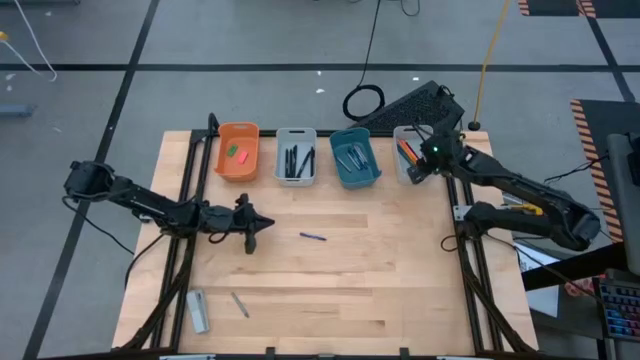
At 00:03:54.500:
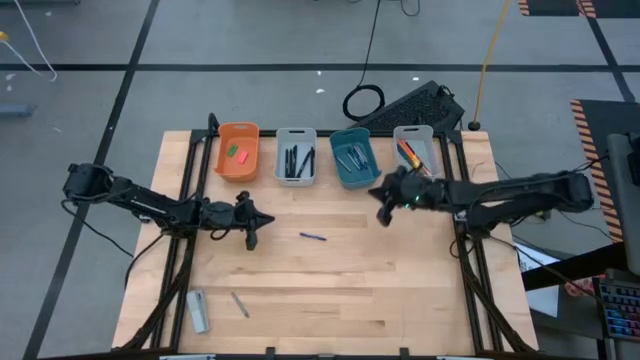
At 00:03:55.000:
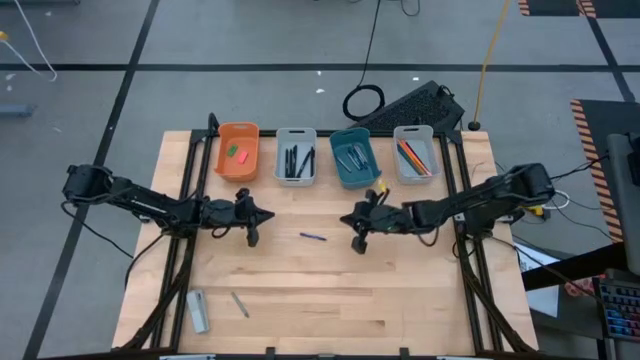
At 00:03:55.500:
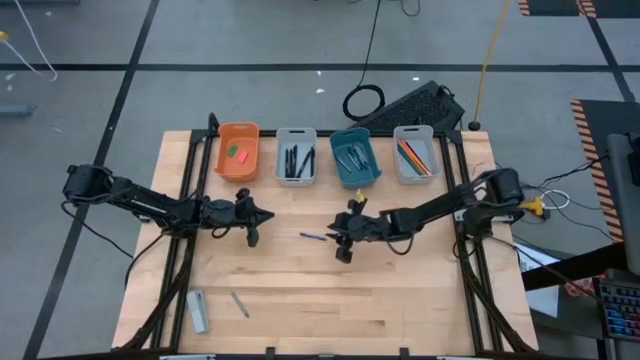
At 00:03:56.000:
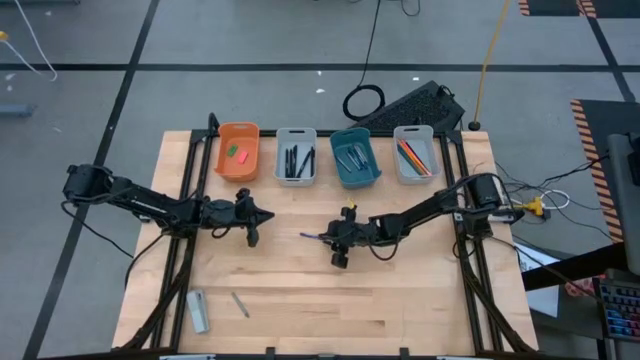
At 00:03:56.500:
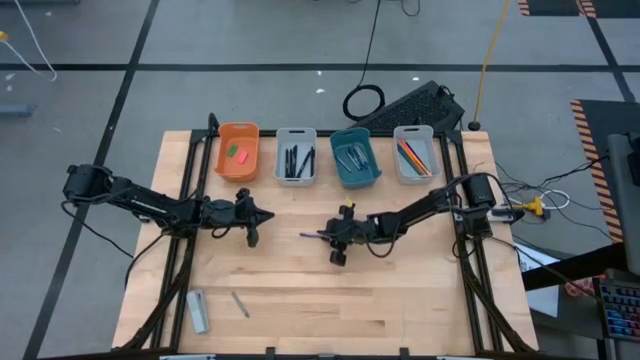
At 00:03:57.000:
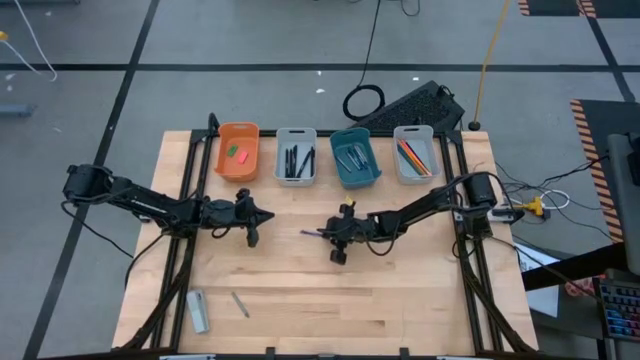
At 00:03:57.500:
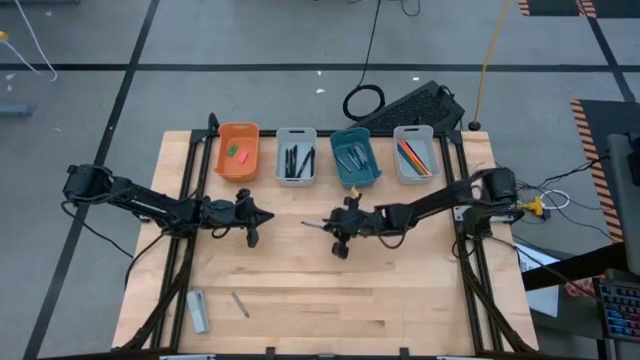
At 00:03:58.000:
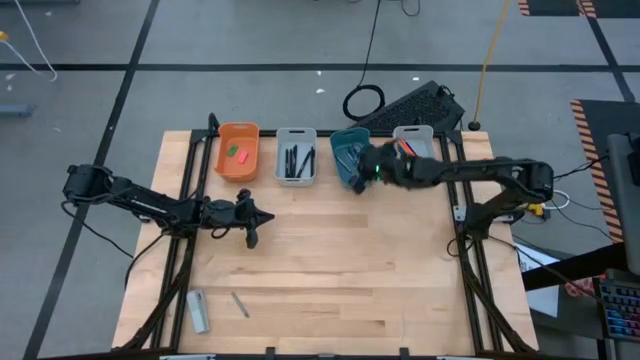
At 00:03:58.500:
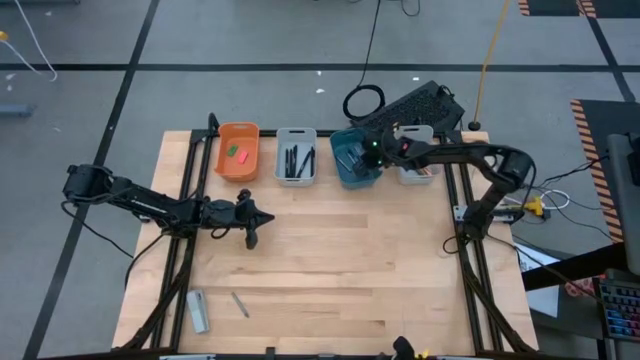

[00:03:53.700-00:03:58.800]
Task: Sort crayons/erasers/pens/pencils in bins
Put the blue crayon into the blue bin

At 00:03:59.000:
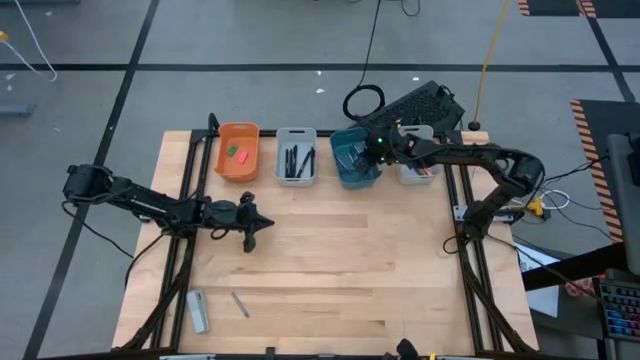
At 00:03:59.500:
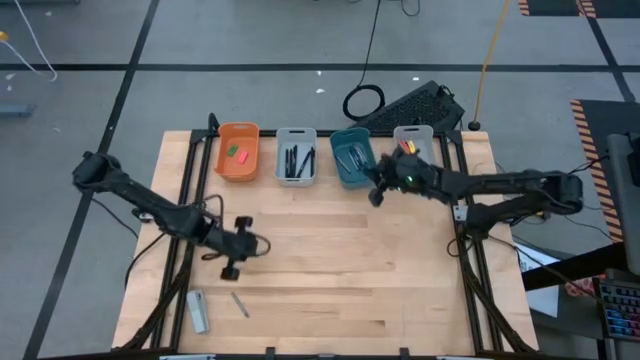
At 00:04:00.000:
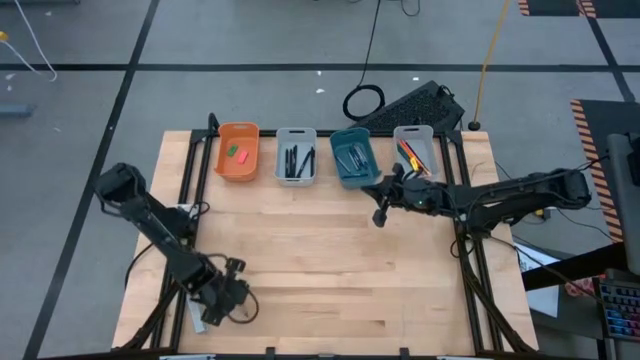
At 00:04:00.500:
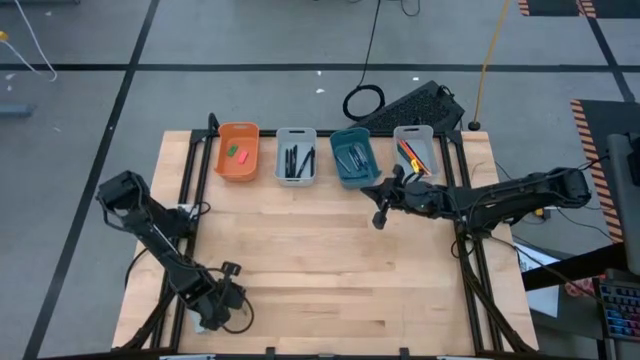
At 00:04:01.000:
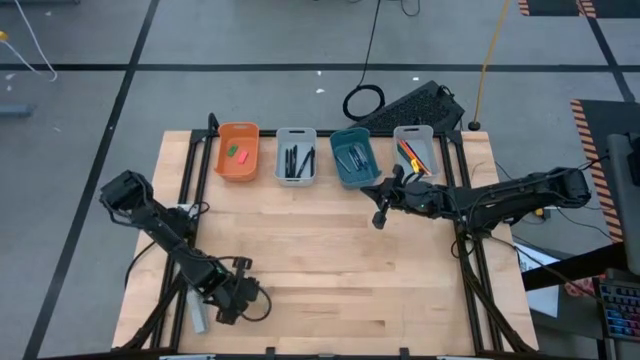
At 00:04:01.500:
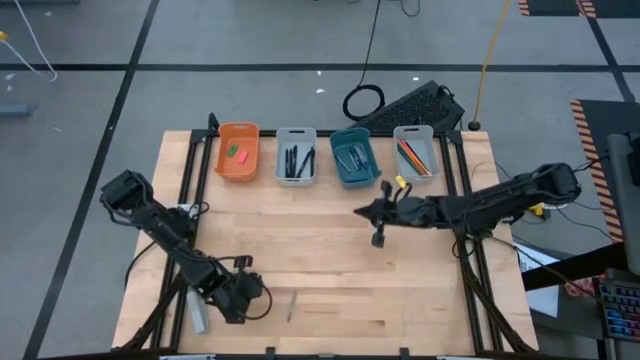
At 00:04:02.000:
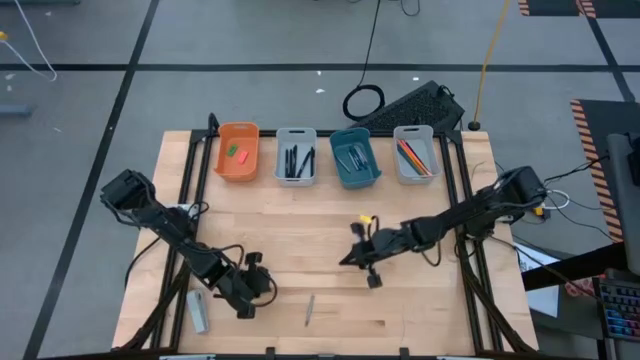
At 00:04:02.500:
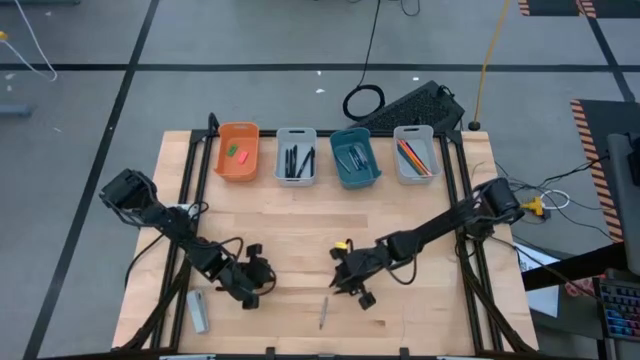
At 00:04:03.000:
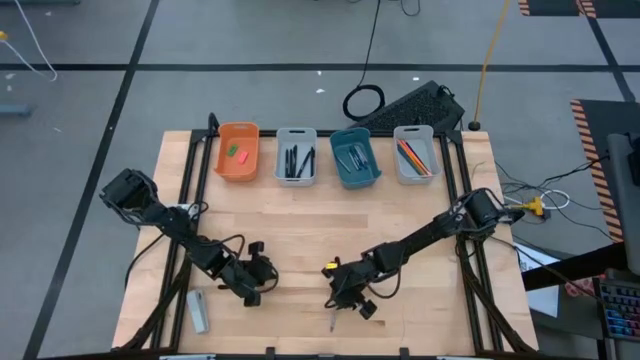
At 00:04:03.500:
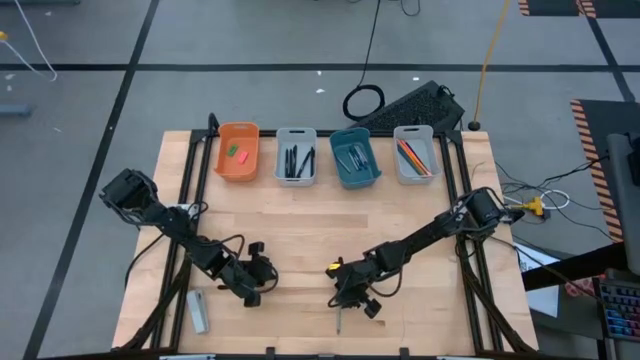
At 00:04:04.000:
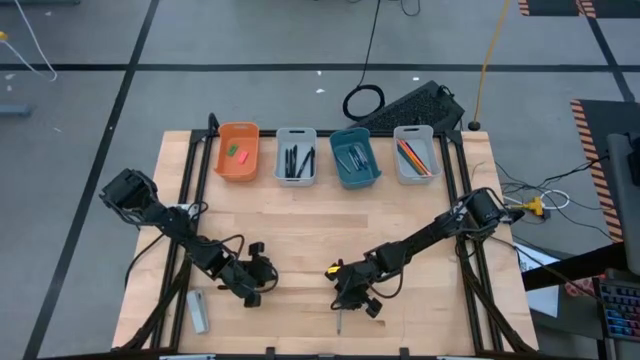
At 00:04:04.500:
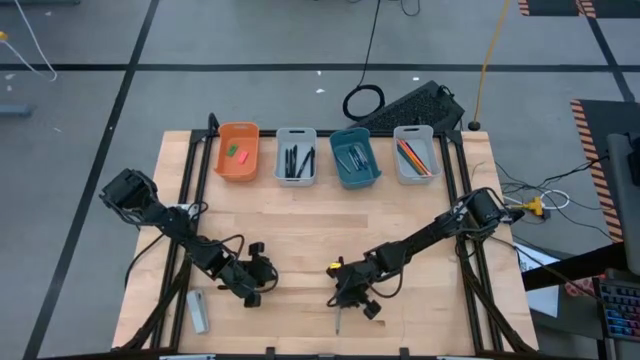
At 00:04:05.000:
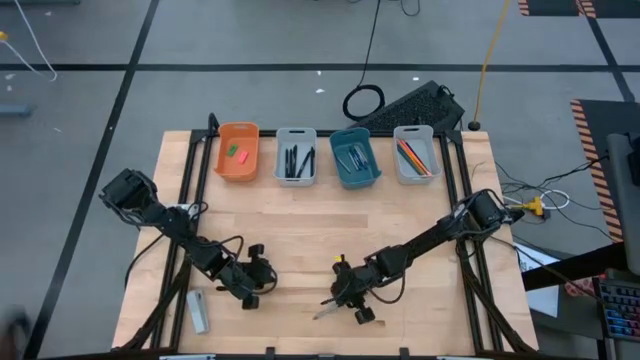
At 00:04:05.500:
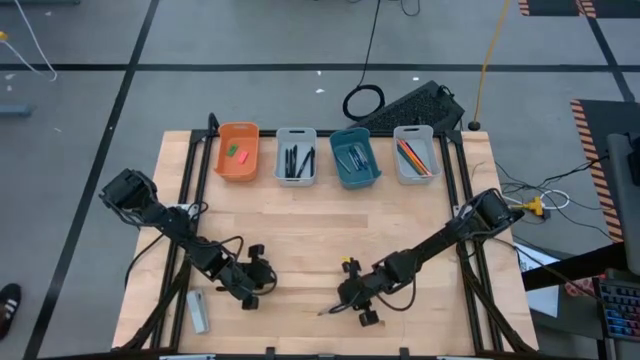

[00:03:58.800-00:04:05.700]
Put the gray crayon into the blue bin

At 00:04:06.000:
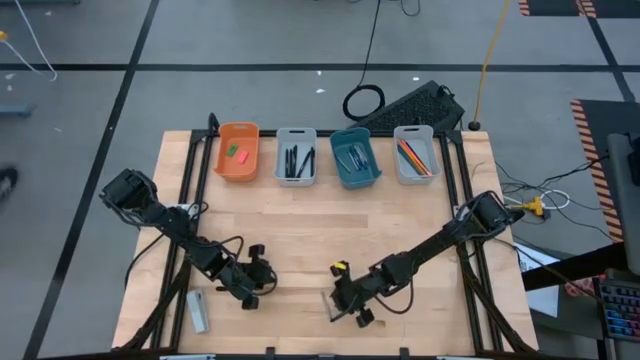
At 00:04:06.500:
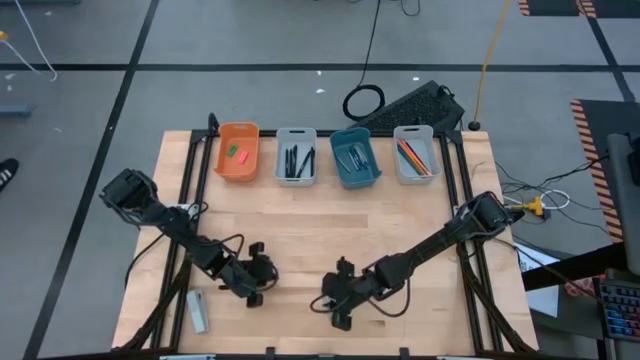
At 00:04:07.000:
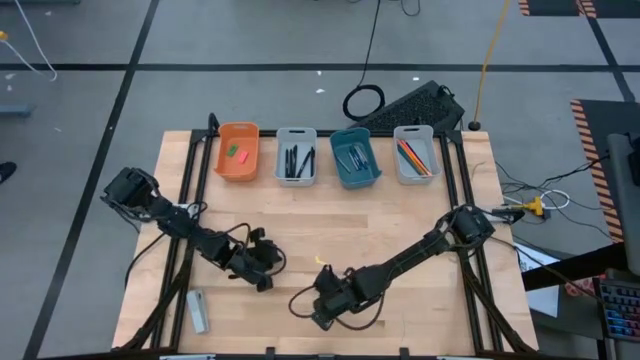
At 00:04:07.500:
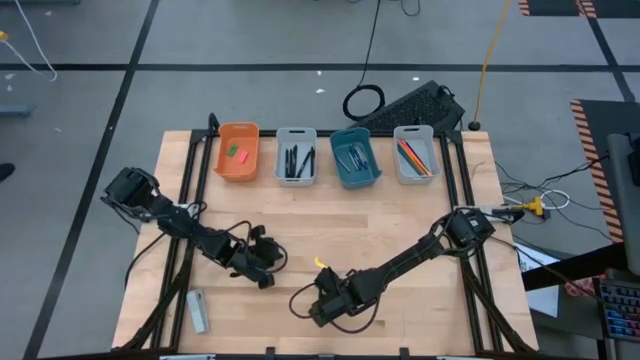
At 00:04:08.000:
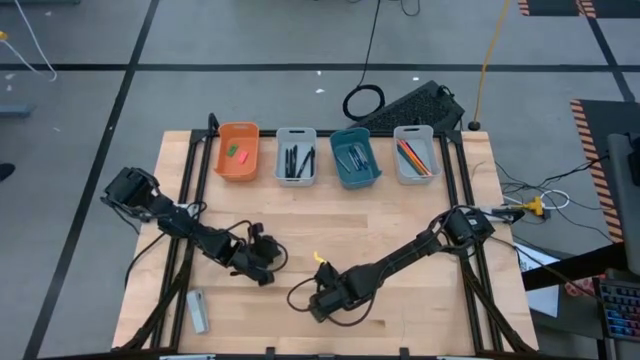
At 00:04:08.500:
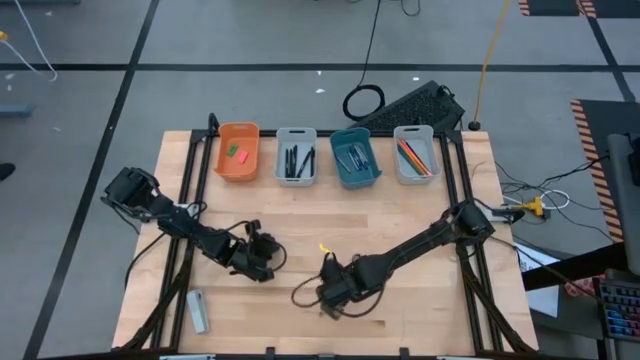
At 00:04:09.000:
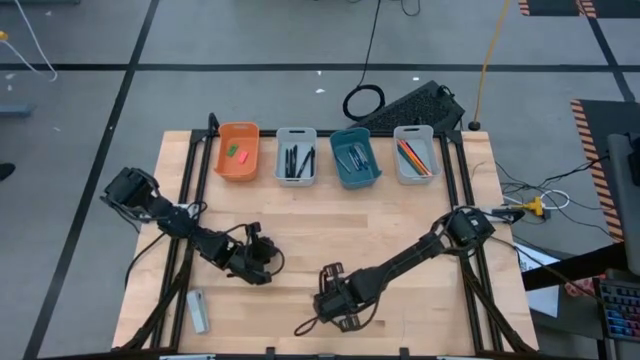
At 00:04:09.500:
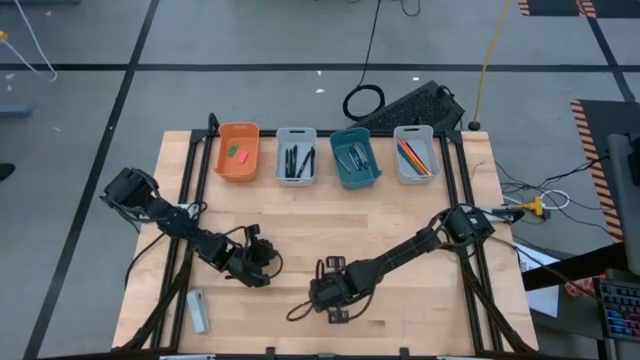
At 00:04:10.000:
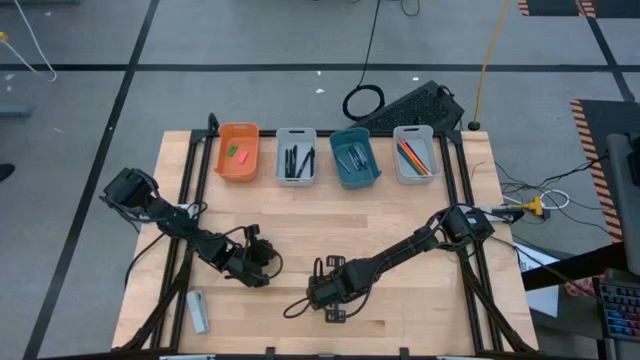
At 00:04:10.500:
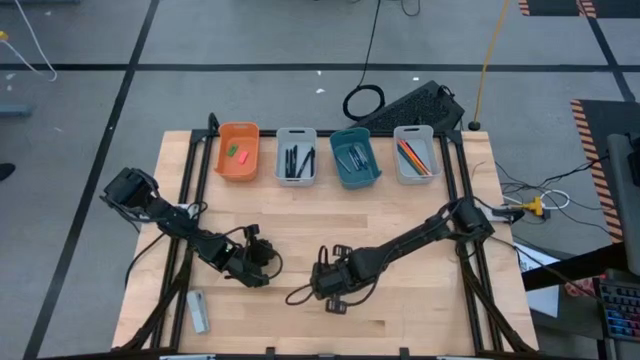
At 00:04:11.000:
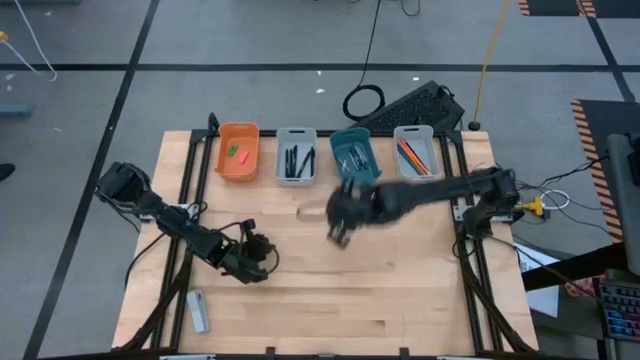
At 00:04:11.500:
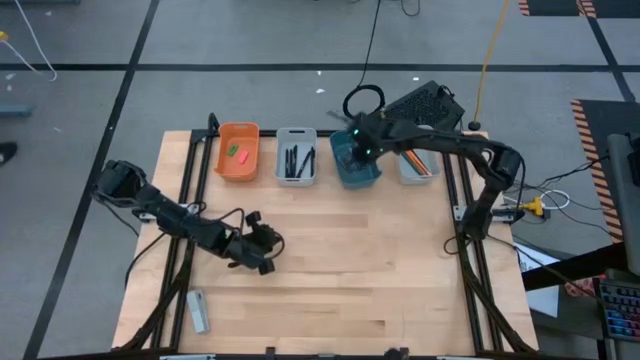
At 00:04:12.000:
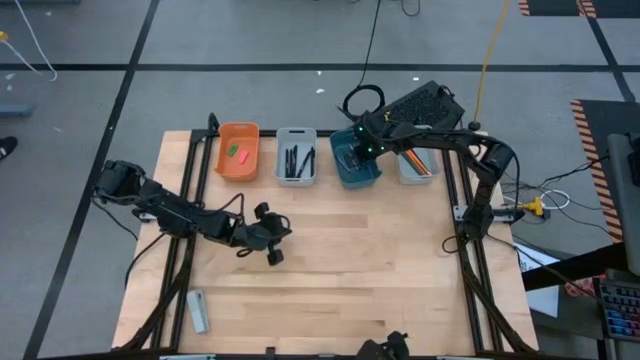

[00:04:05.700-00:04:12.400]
Put the gray crayon into the blue bin

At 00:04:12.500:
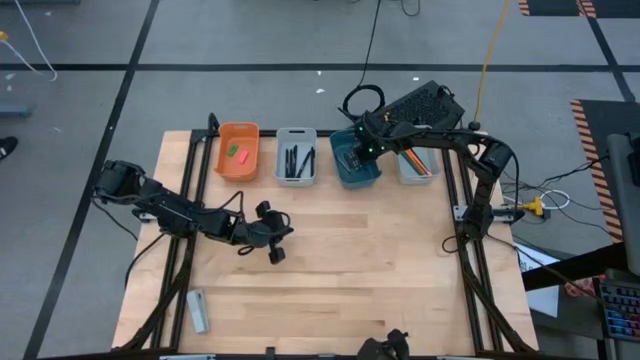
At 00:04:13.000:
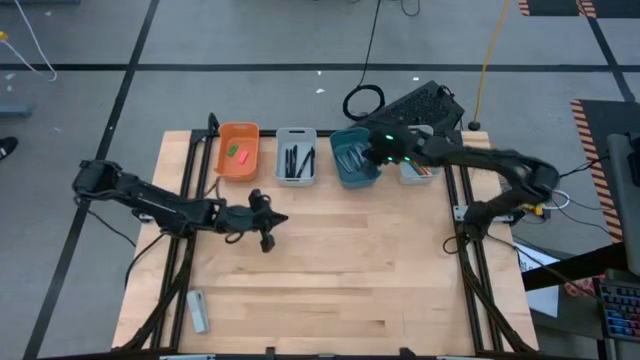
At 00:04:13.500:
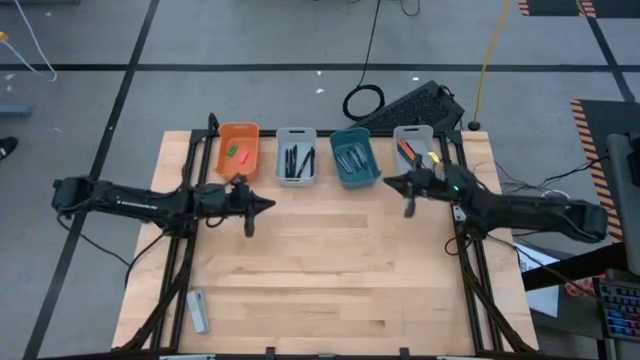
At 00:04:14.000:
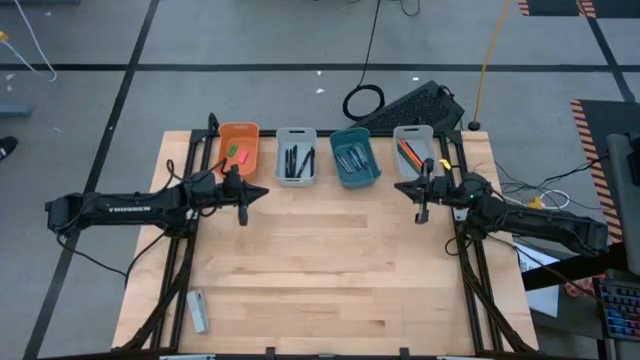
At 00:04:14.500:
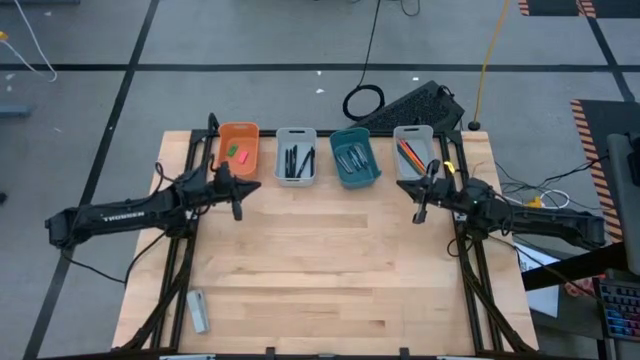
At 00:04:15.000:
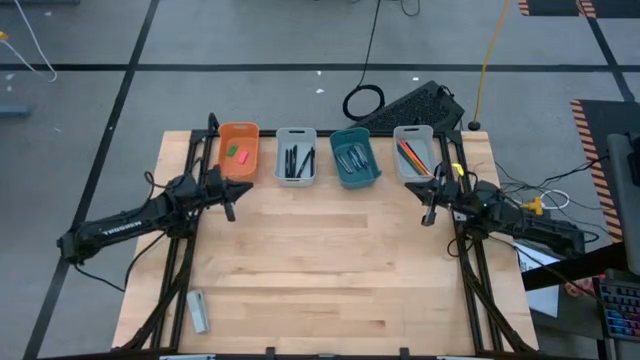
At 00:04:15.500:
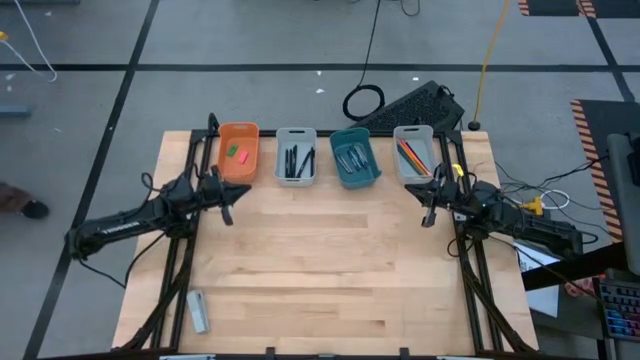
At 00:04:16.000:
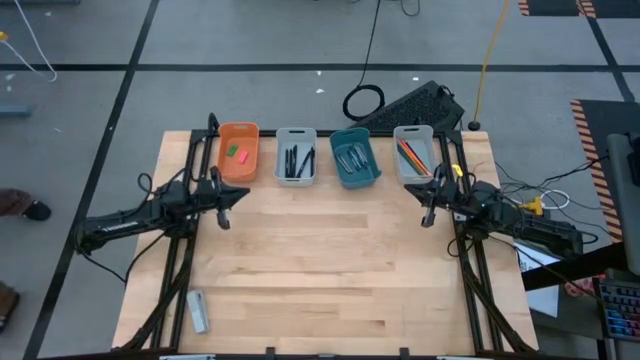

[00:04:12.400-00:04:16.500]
Return to Home Position
